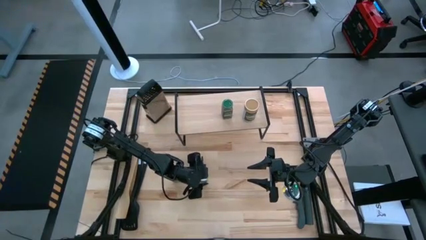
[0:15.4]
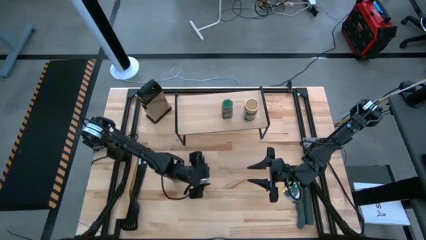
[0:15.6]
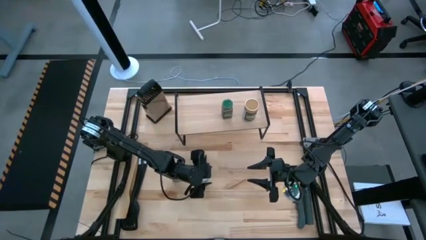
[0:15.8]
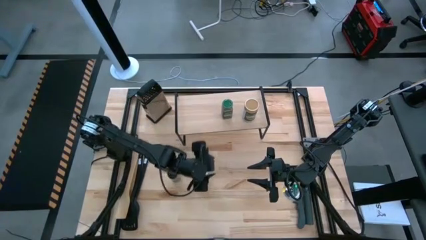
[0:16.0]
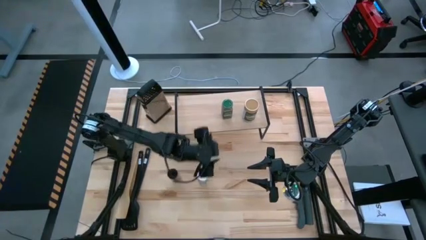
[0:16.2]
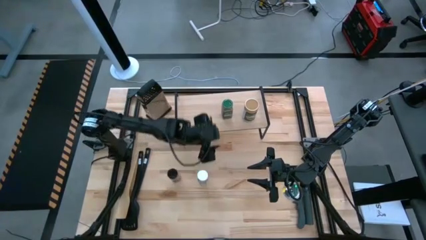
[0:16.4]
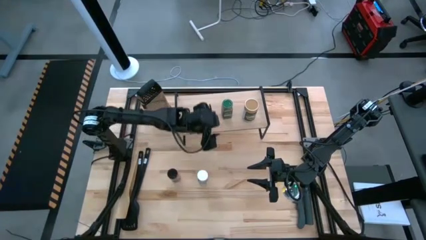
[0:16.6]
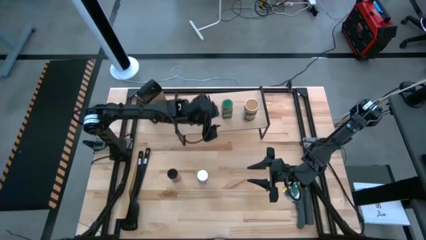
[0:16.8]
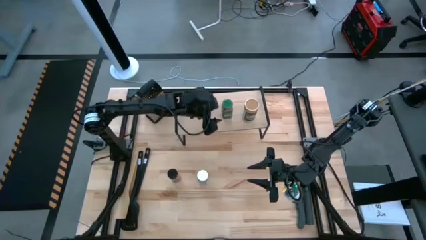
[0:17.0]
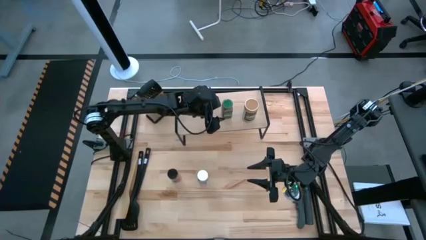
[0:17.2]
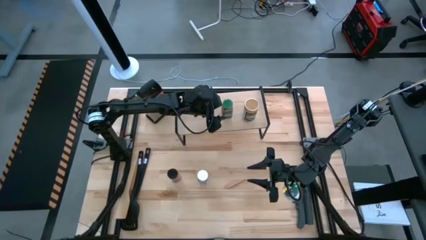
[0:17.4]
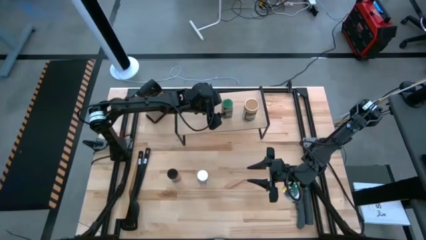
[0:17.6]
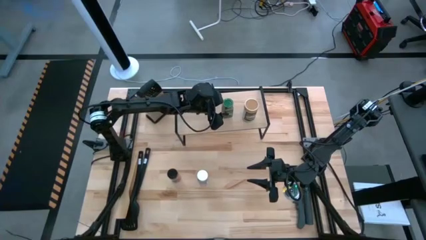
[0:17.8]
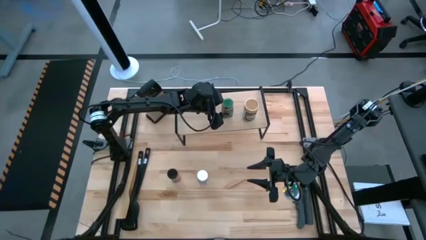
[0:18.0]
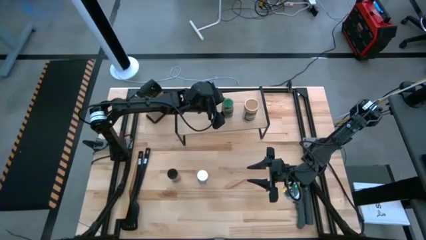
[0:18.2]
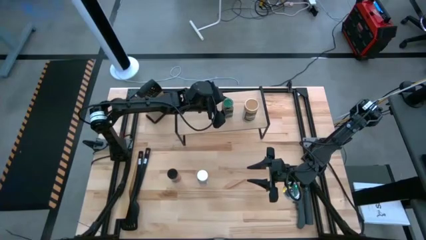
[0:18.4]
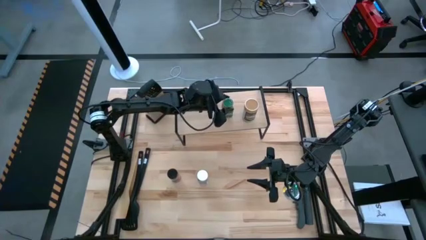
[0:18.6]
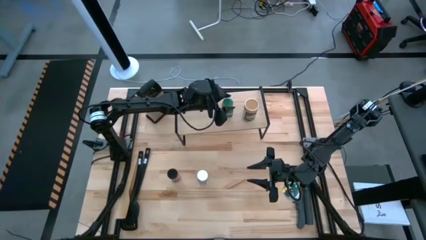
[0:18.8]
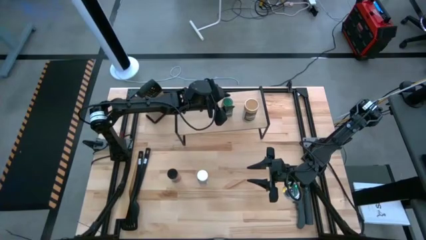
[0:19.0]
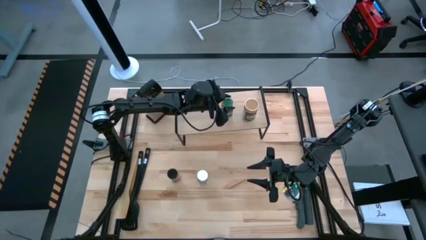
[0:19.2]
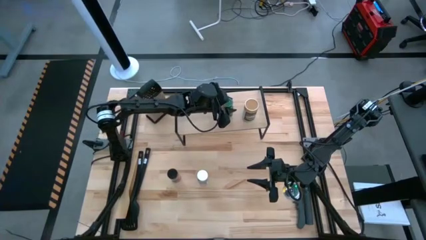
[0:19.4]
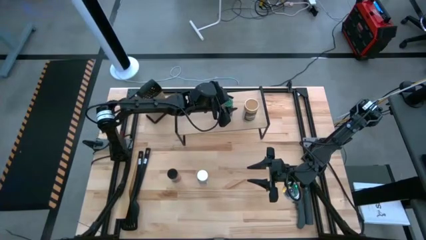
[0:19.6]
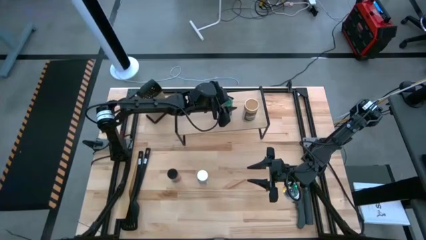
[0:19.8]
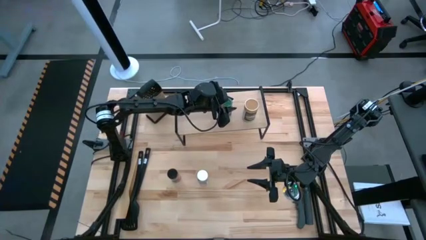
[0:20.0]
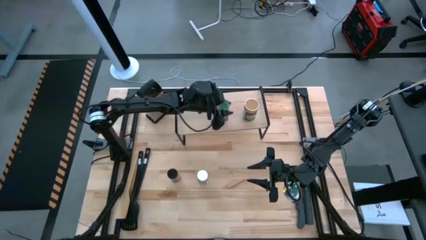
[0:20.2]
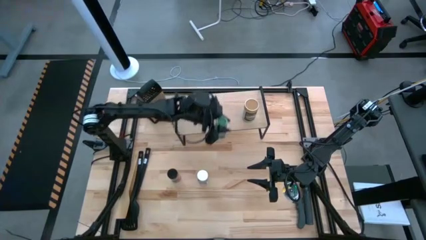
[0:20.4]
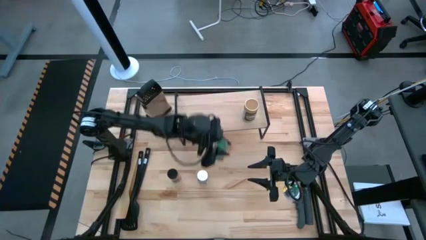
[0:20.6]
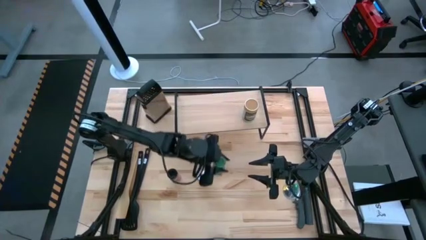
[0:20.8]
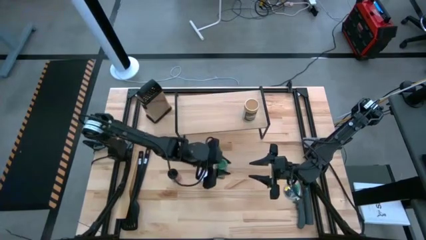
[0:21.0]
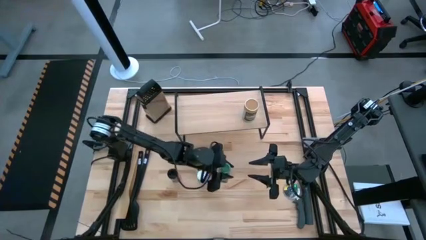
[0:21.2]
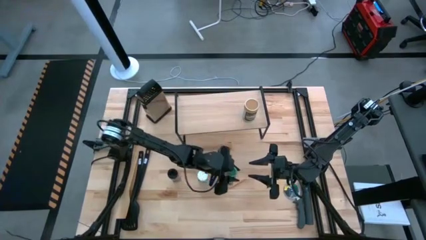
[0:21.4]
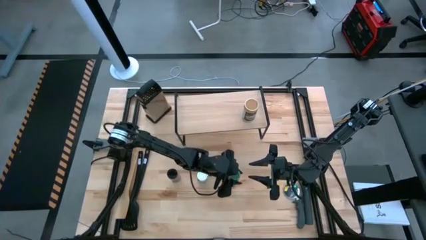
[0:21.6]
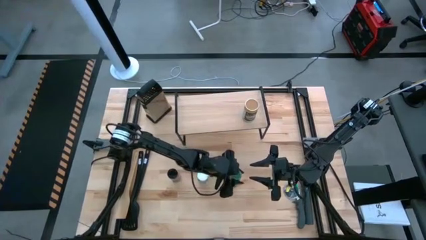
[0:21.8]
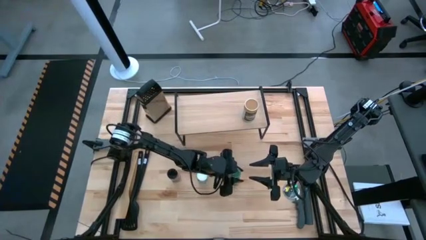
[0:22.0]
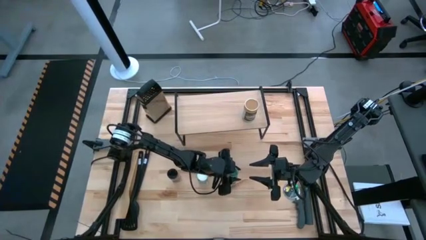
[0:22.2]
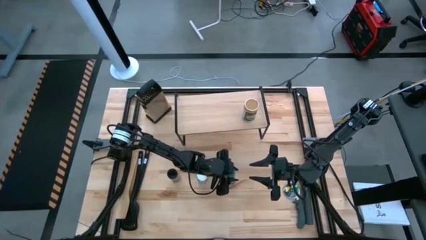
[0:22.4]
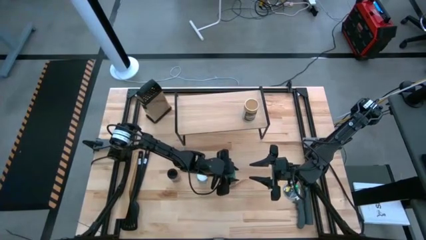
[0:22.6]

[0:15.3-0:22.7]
Task: Shelf spices
Remove the green seasoning bottle from the shelf

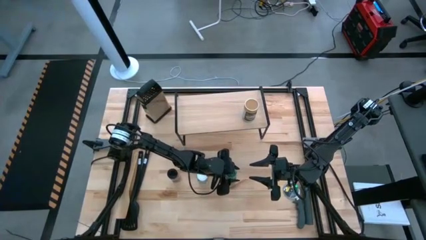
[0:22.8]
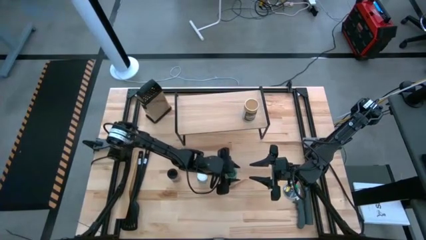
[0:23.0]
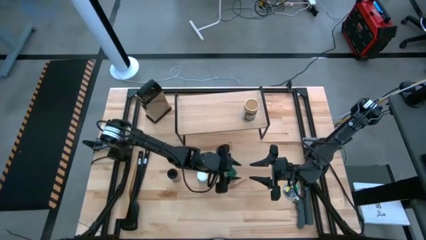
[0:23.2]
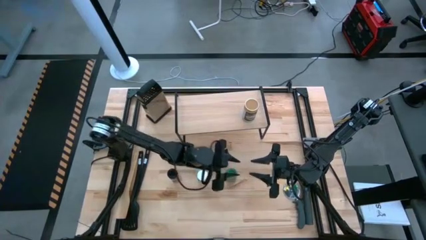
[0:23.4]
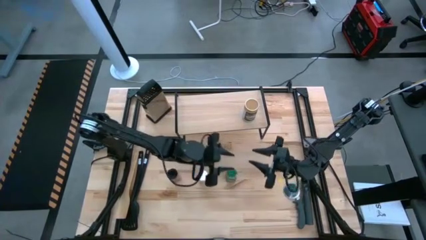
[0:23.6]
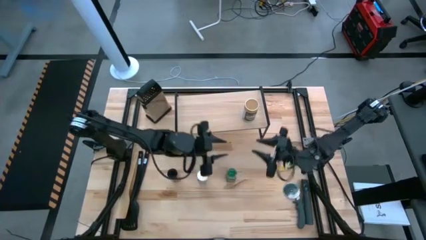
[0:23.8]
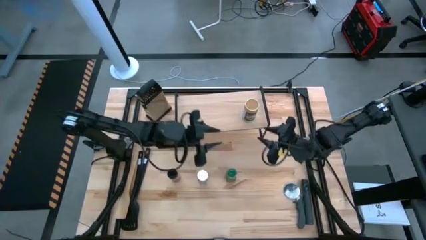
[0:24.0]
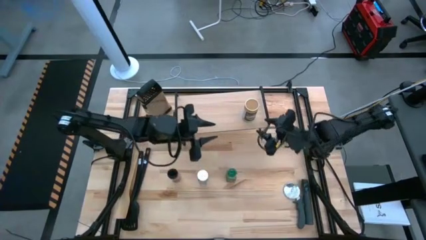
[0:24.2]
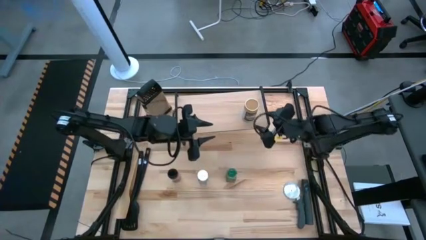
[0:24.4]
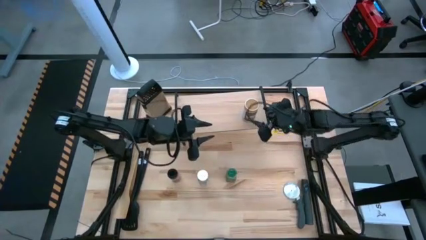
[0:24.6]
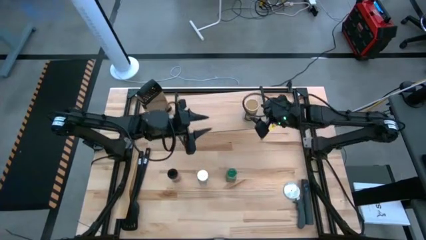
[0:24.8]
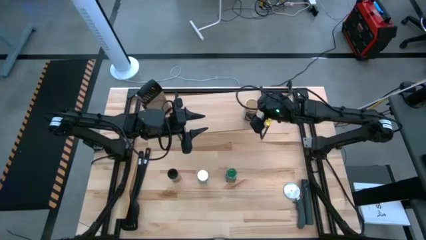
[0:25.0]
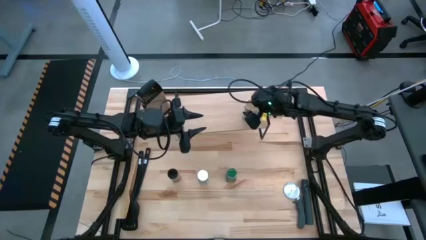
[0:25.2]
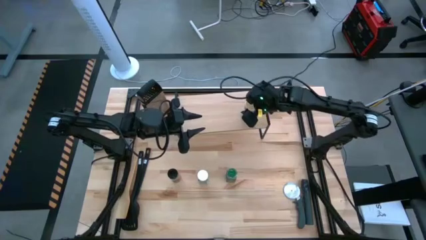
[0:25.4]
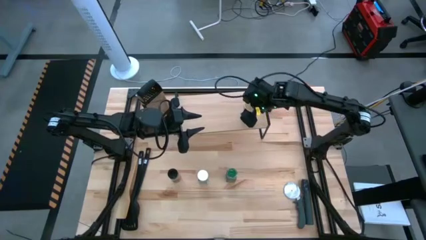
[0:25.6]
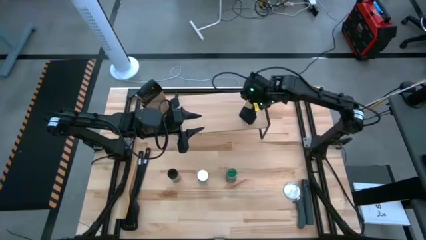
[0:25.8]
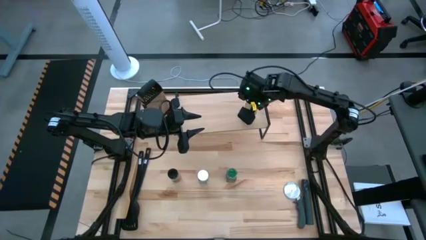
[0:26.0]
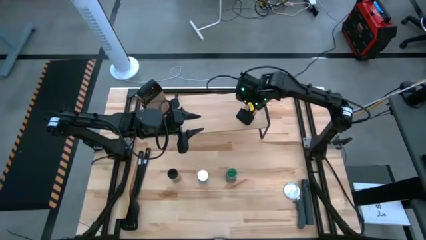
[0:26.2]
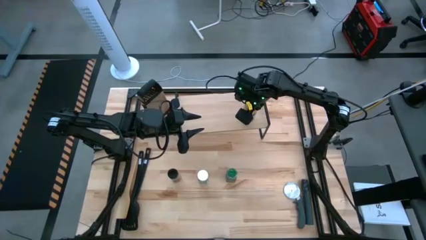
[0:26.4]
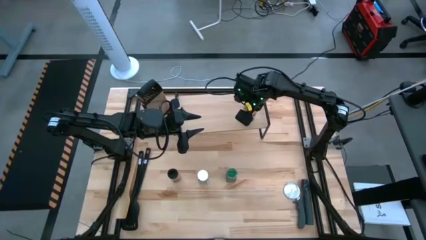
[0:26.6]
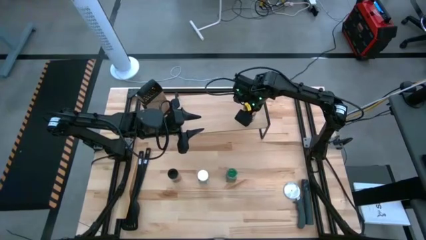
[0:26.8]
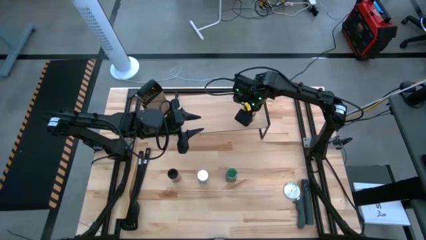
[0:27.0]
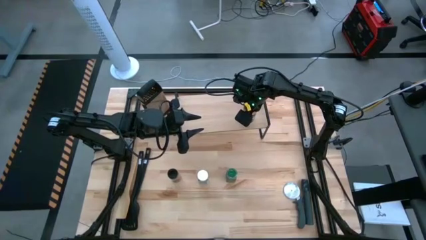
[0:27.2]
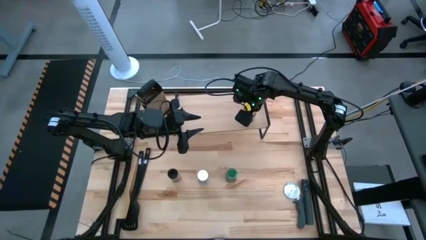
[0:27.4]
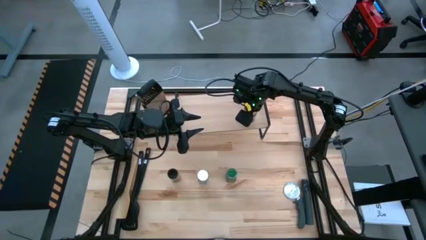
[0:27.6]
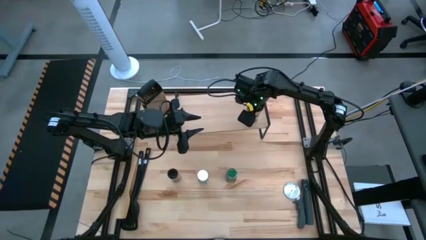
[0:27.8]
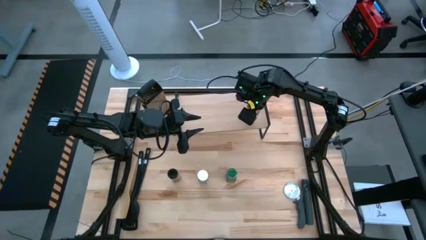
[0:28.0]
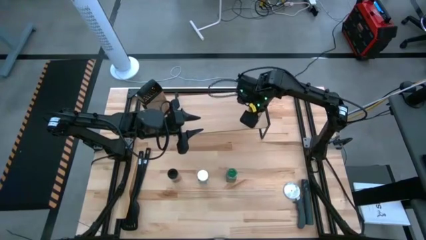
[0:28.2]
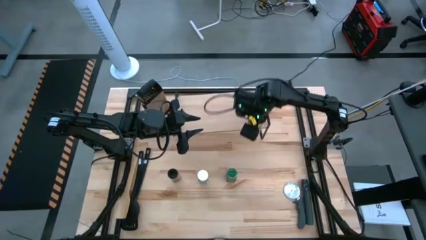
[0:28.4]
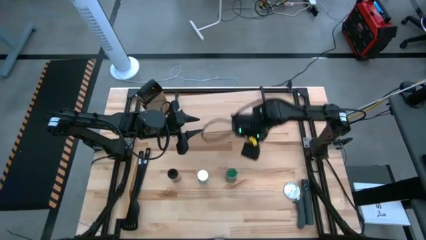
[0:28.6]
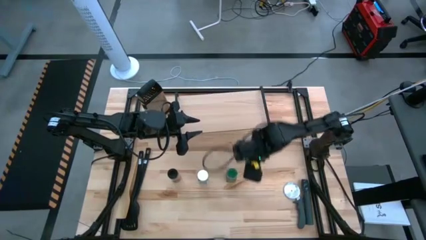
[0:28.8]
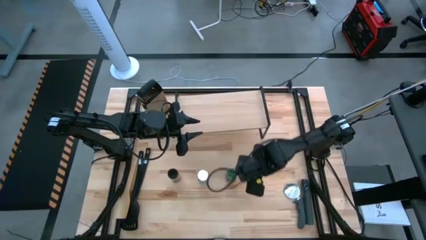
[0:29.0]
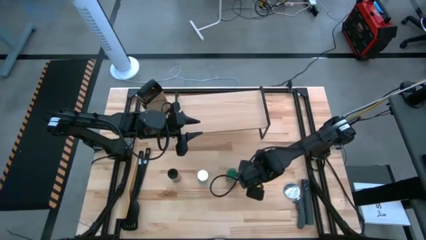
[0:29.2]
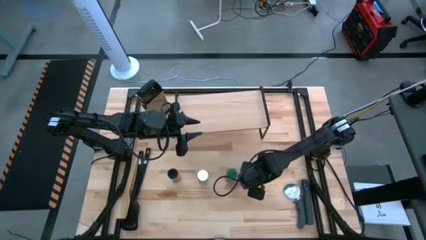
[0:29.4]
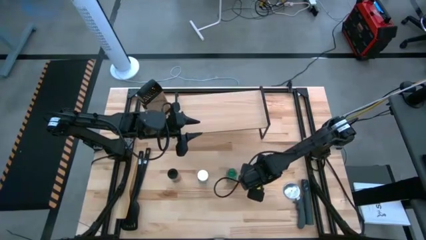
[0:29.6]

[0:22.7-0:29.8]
Remove the brown seasoning bottle from the shelf

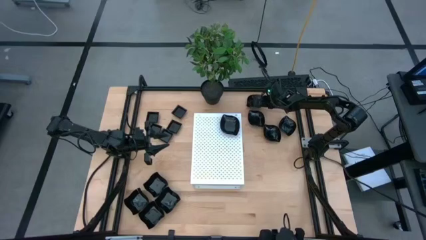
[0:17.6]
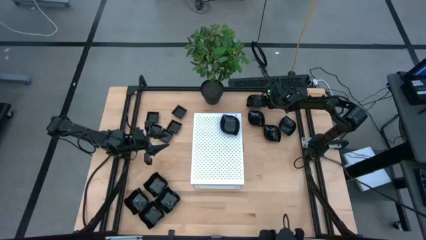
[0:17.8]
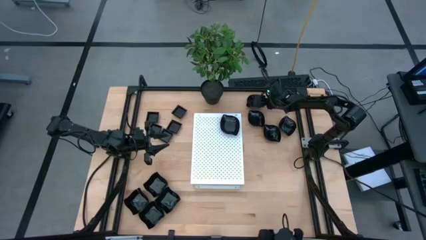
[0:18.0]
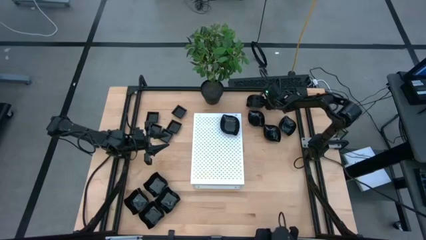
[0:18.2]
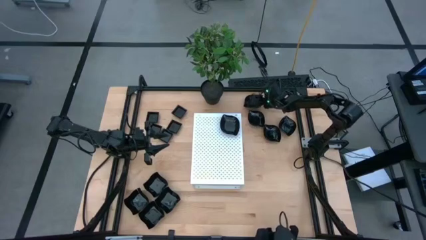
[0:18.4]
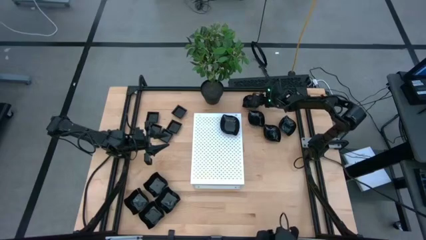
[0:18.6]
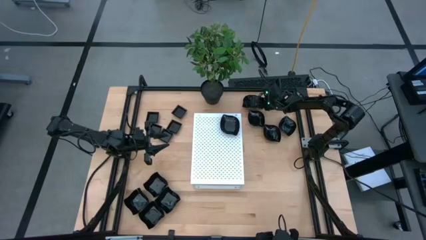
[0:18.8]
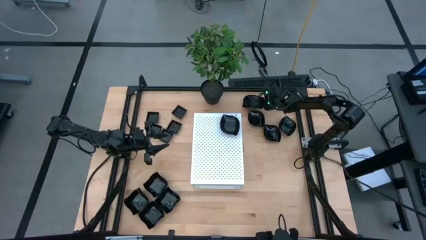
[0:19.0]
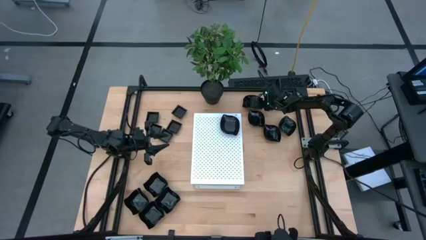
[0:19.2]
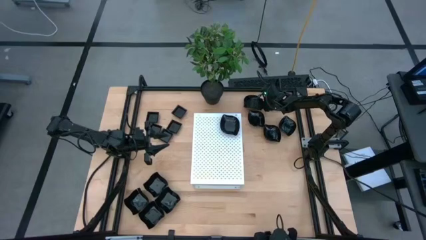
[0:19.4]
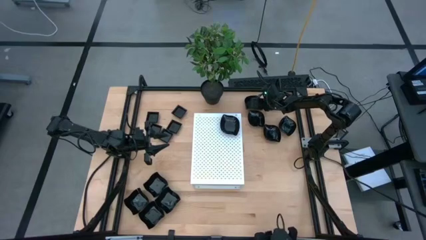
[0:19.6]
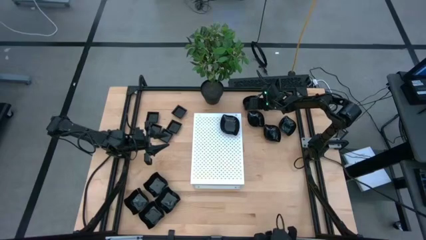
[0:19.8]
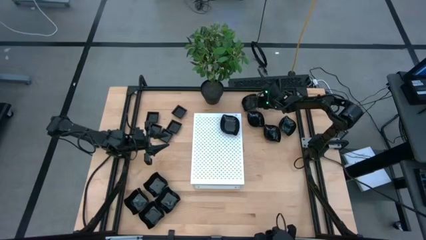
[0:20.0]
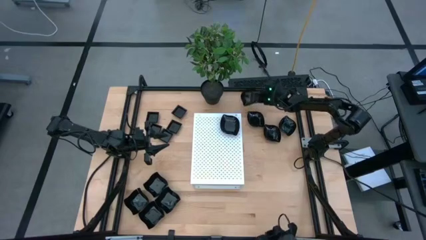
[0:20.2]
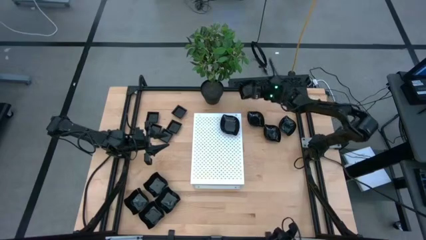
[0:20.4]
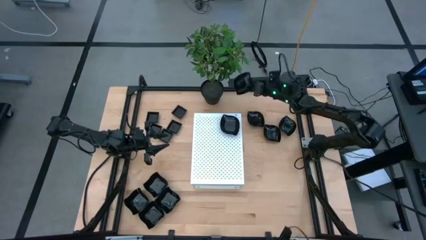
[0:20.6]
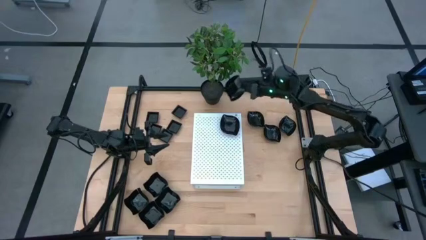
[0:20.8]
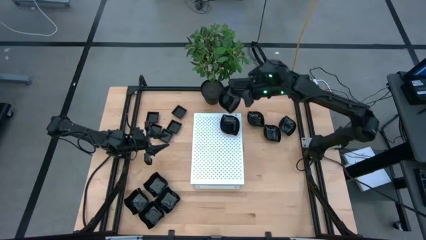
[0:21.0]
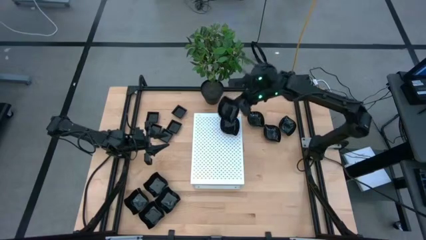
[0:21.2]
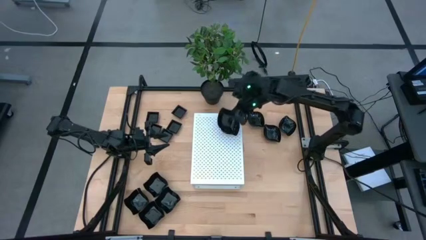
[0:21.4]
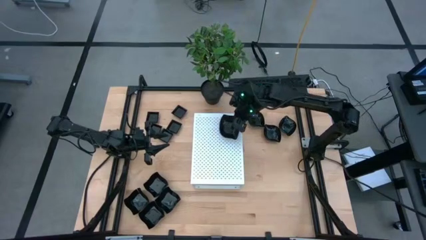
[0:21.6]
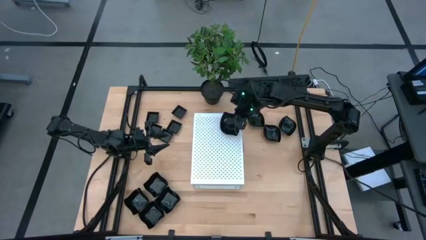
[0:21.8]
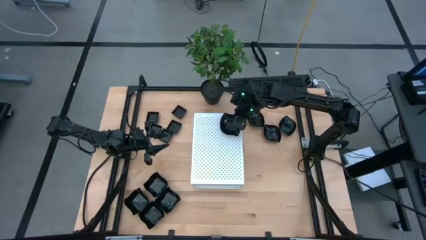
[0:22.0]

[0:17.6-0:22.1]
Task: Pick & Place Mini shaped plates
Stack the black leaf shaped plate on top of the black leaf shaped plate on the shelf
